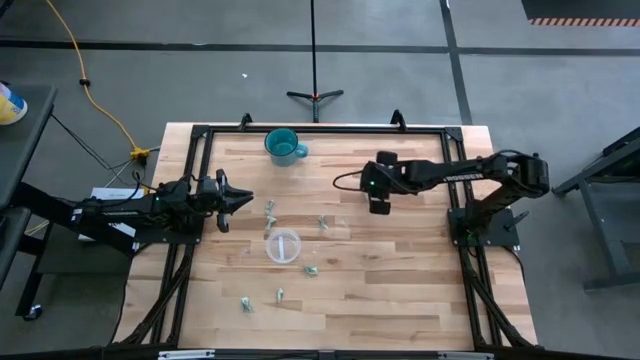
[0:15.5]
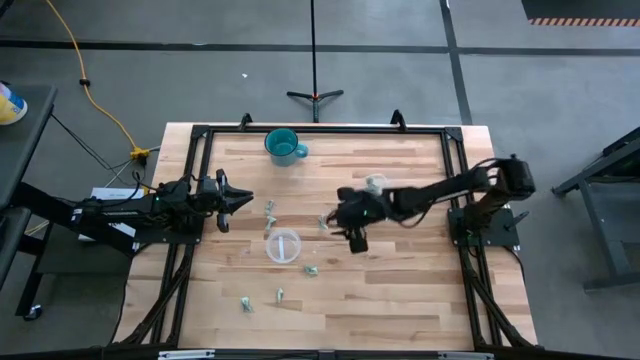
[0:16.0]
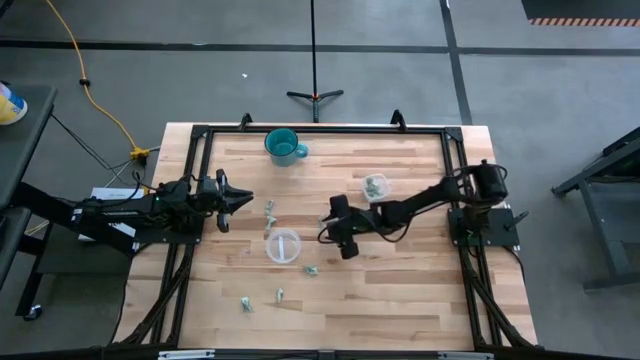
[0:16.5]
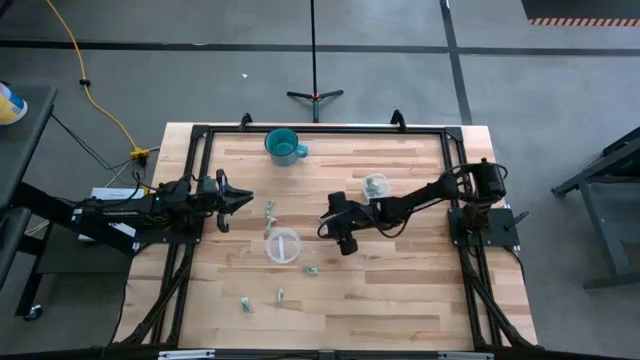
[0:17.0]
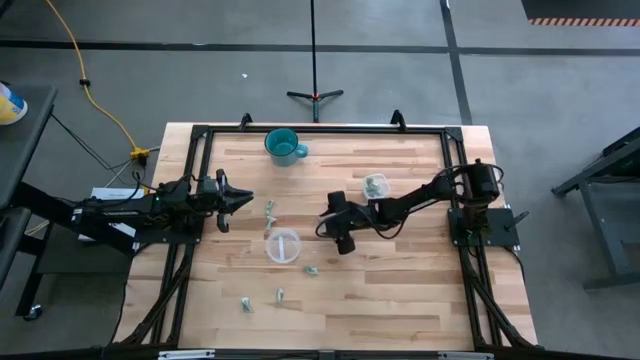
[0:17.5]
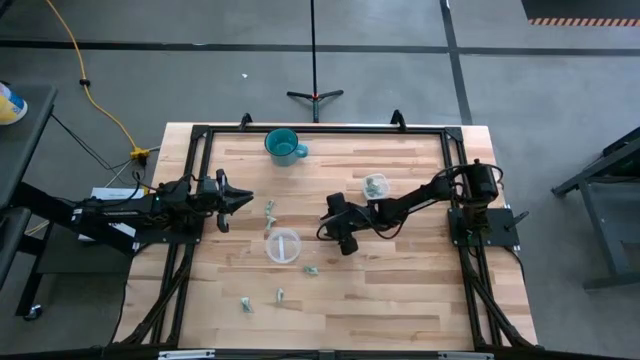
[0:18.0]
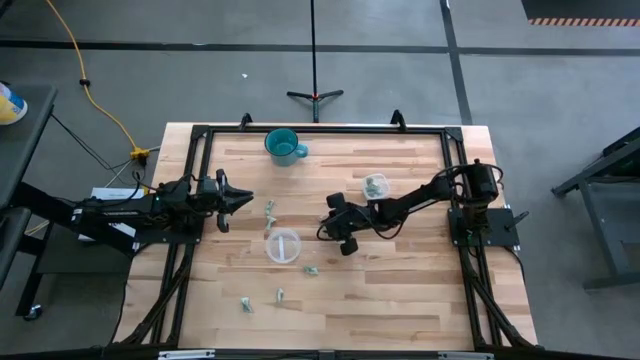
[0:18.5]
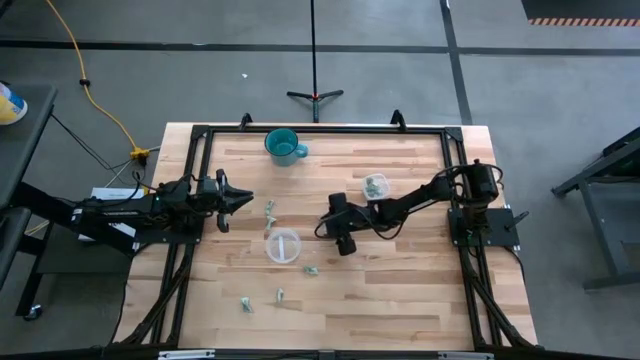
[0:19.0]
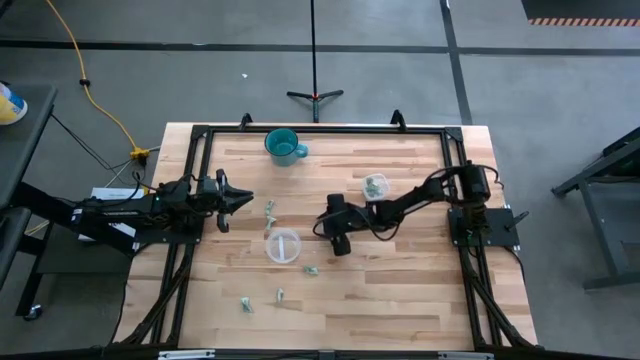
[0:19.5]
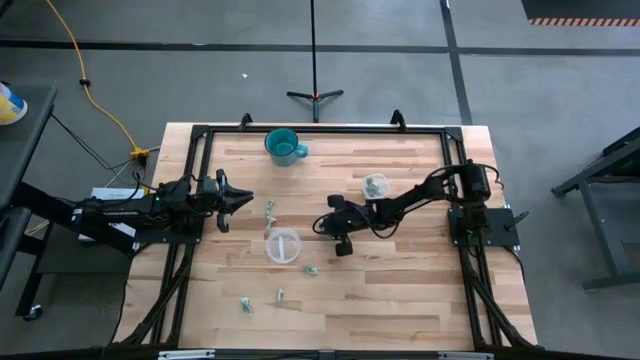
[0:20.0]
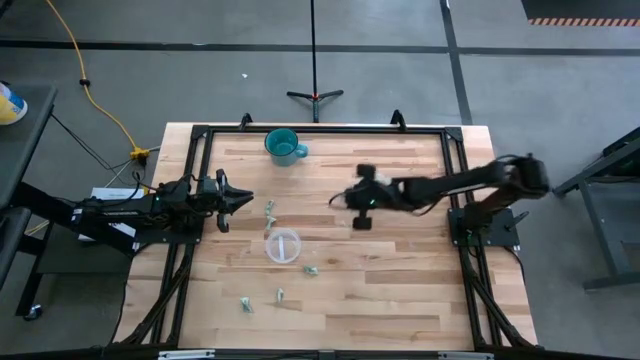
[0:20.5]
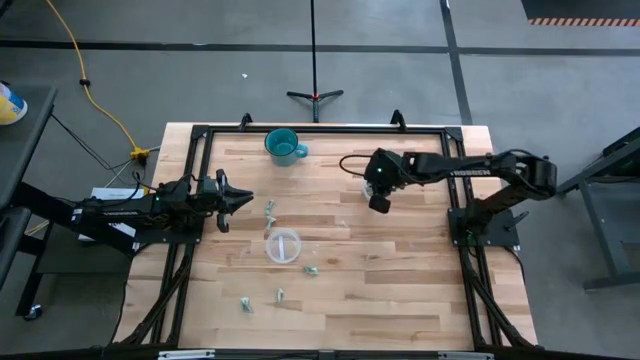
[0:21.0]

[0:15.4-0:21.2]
Task: Pick and place items into bin
Put the stevia packet into the right transparent bin

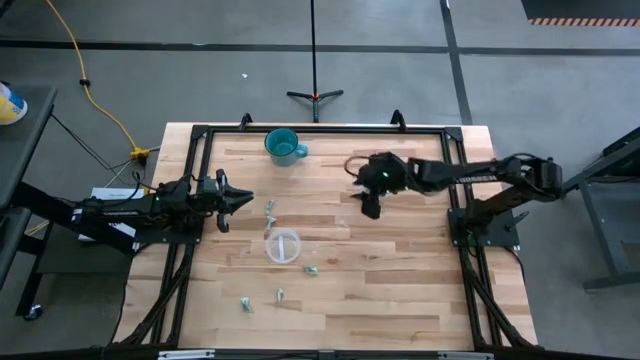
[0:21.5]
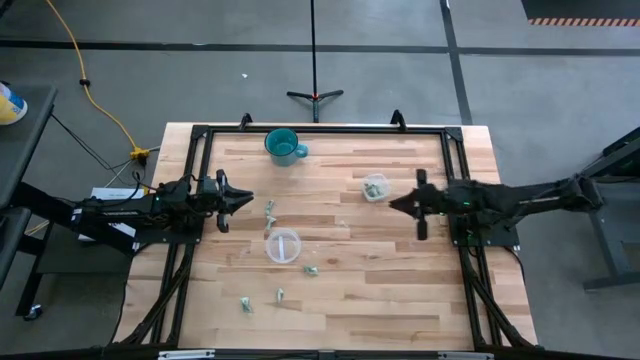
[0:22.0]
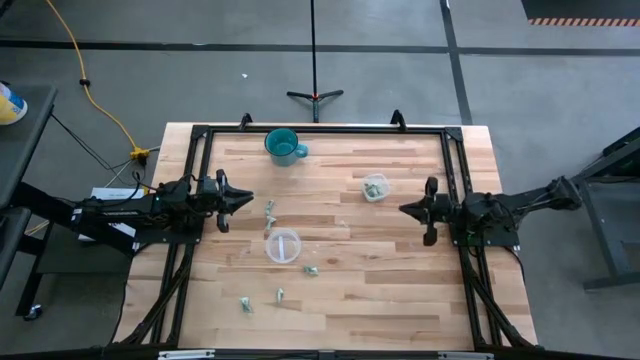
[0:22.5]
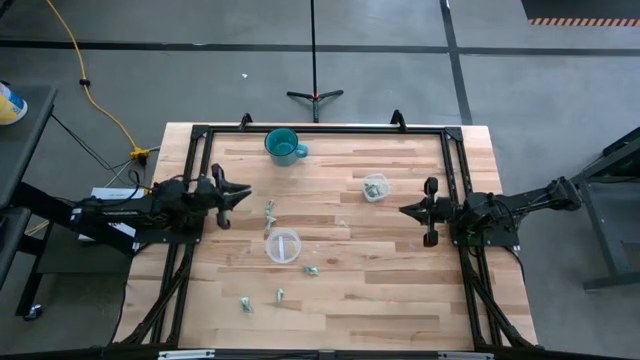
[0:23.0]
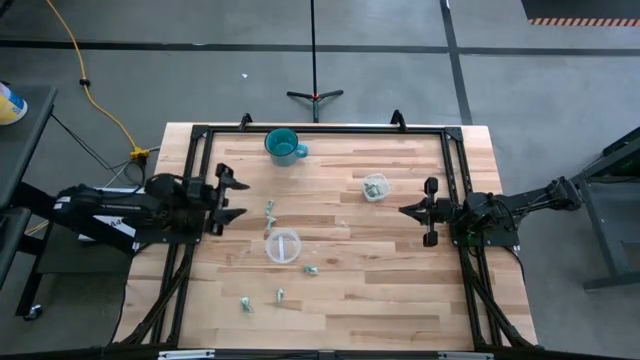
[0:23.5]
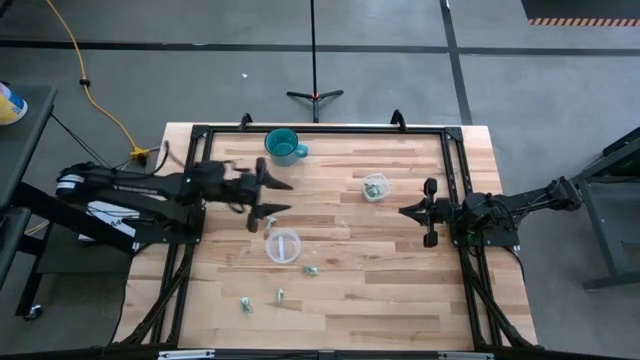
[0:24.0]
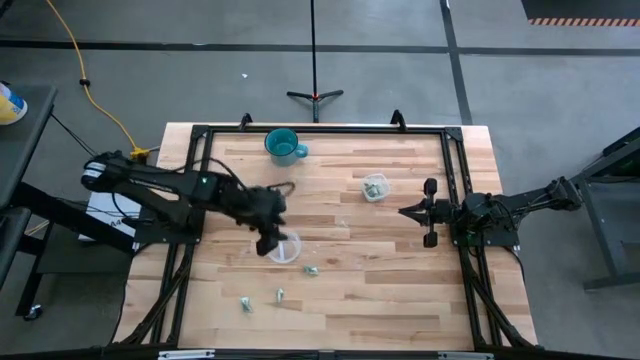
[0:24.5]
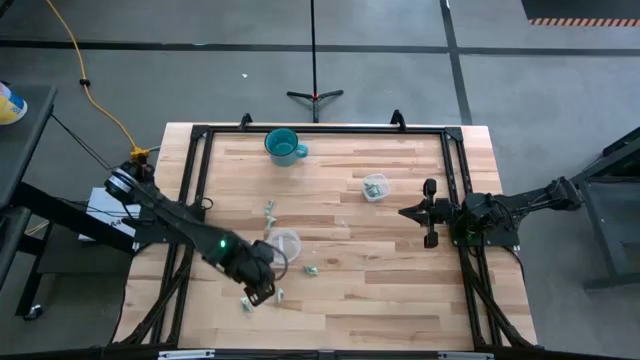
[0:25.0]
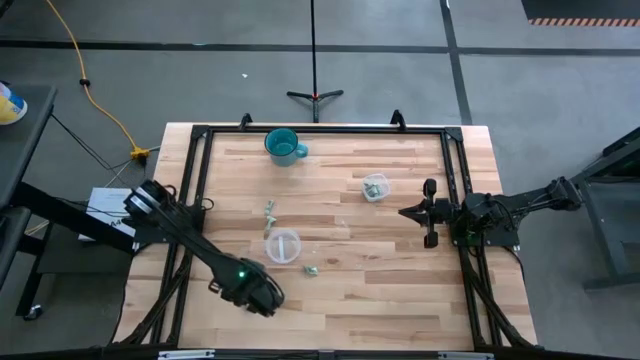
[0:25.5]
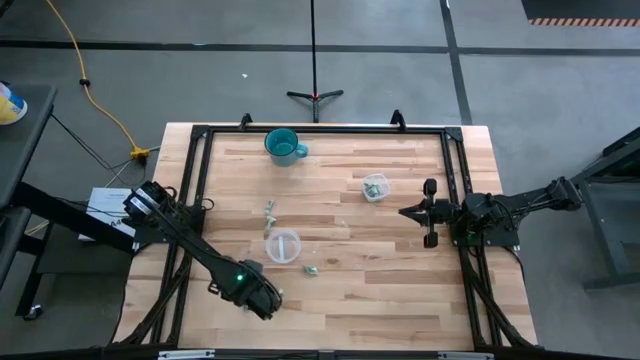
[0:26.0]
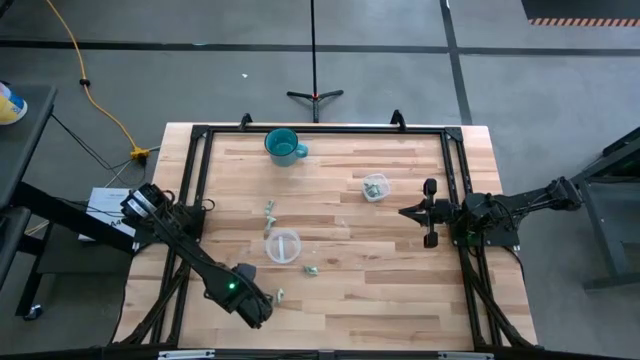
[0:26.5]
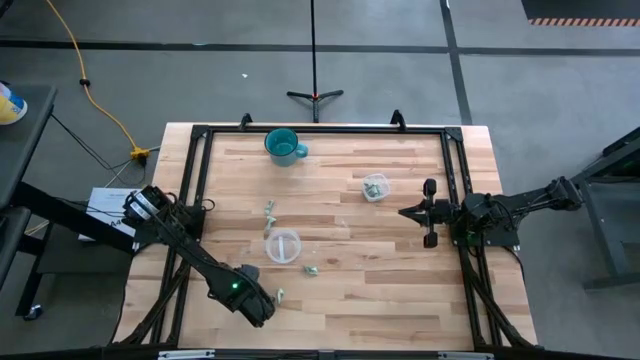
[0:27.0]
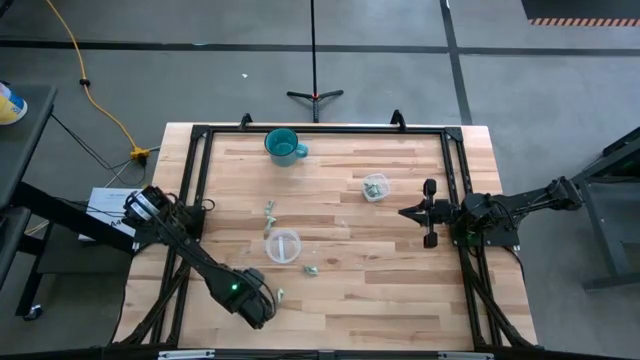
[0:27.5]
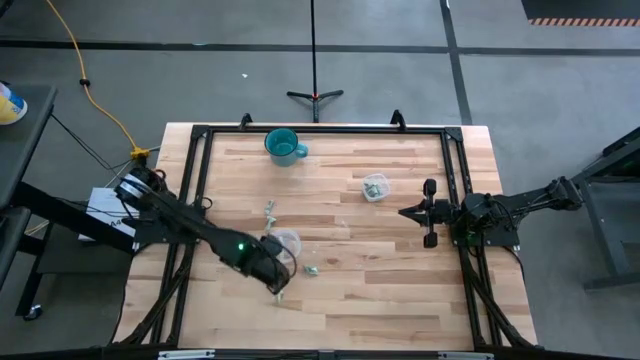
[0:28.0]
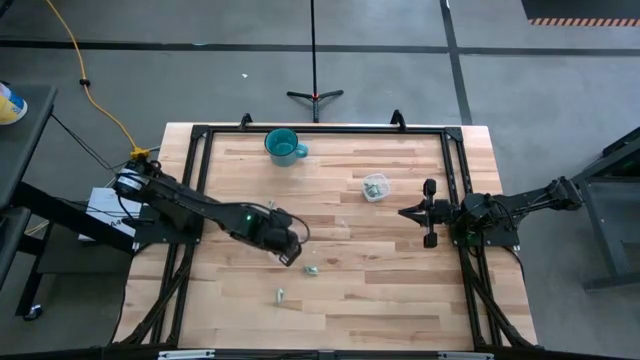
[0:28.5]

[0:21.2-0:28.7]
Put the stevia packet into the left transparent bin

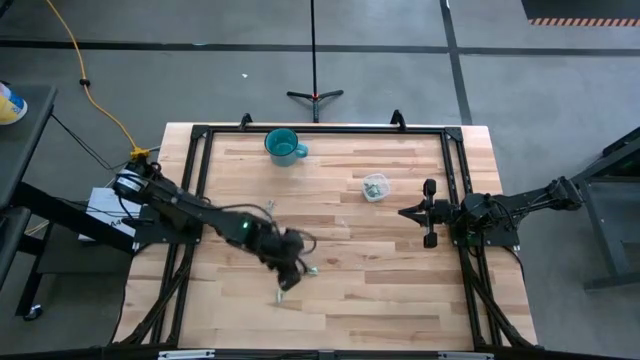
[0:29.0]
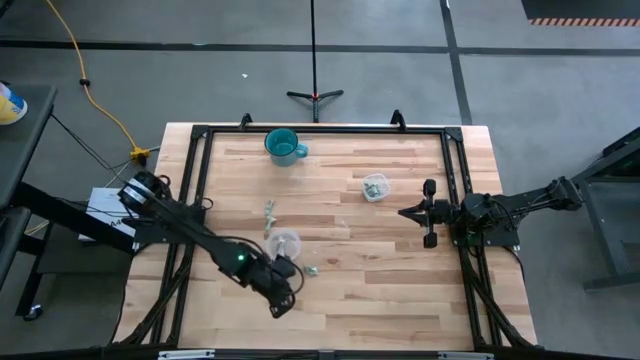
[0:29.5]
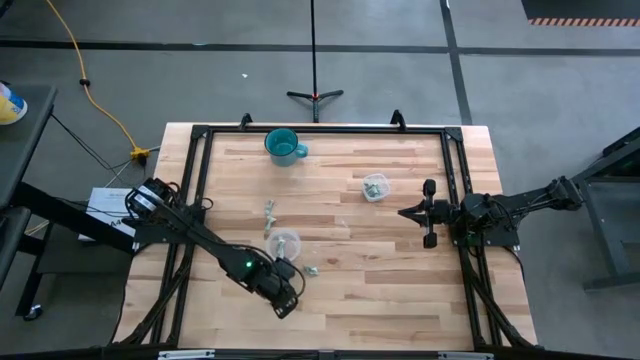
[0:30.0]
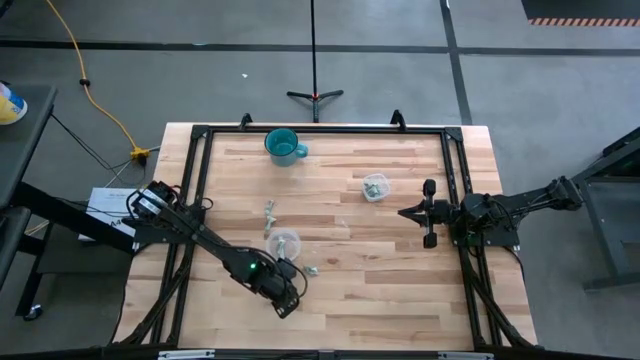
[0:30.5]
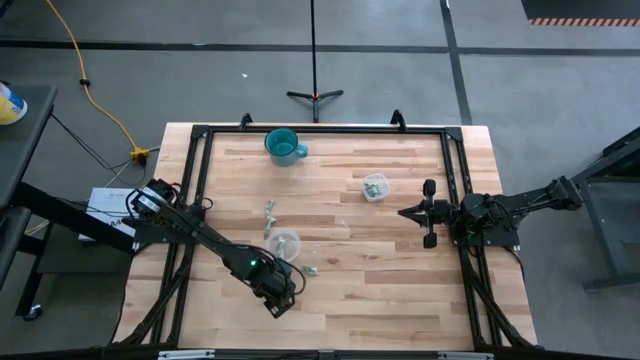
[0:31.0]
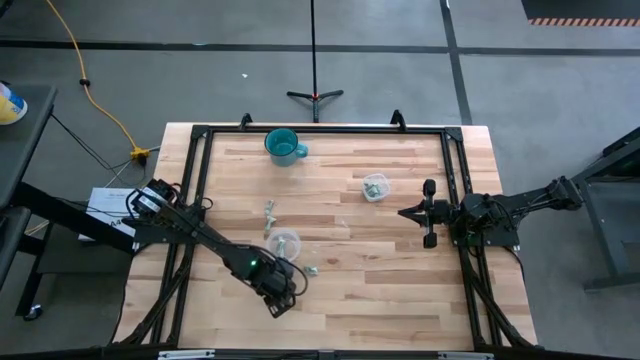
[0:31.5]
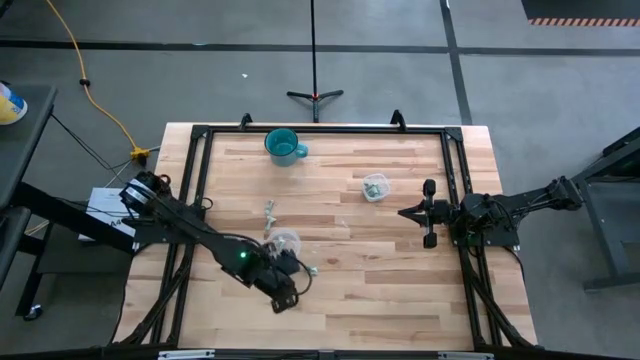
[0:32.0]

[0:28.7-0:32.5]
Put the stevia packet into the left transparent bin

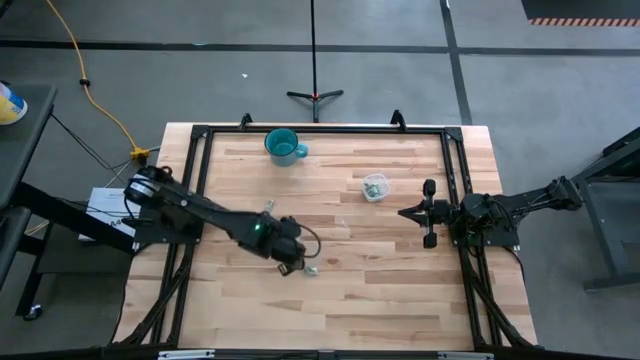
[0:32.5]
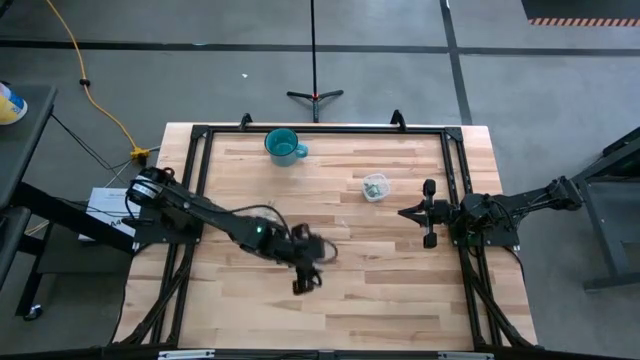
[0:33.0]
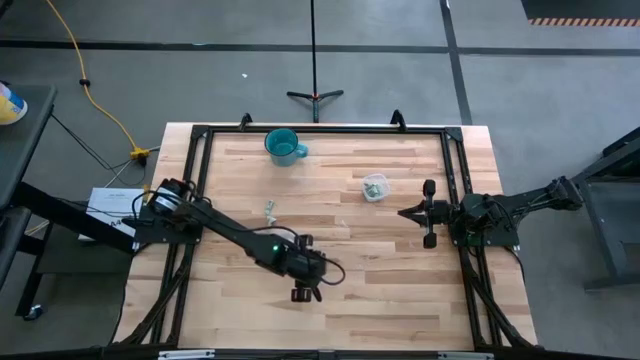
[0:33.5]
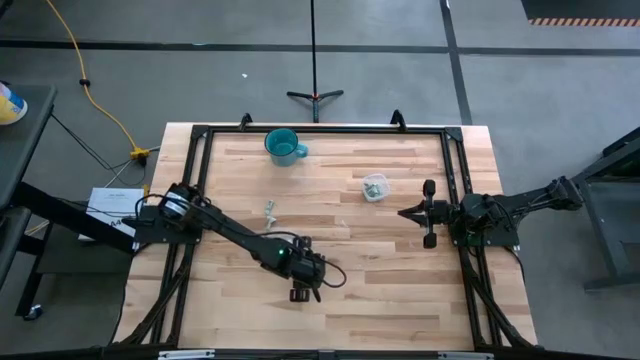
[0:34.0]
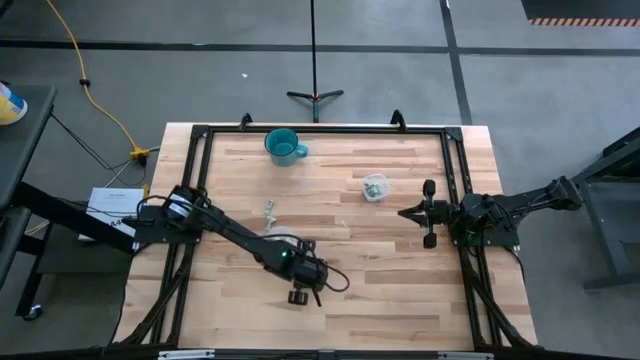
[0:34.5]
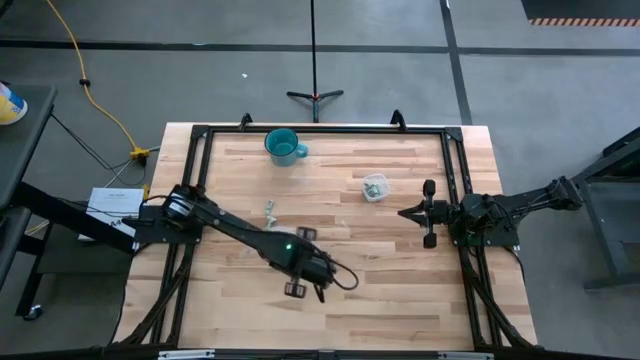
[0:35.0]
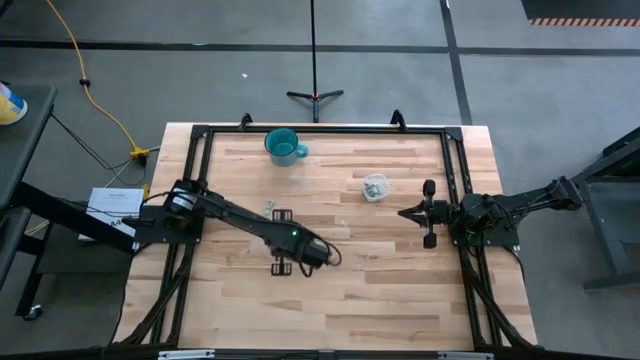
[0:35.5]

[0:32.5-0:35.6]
Put the stevia packet into the left transparent bin

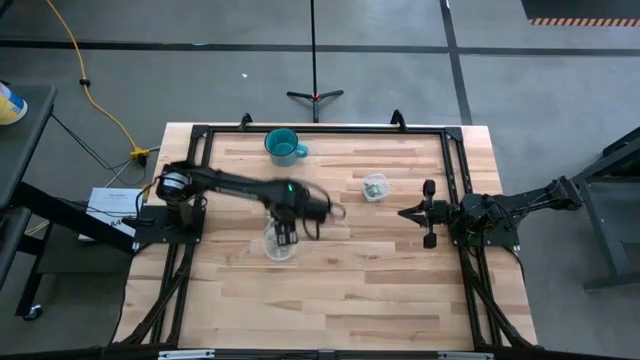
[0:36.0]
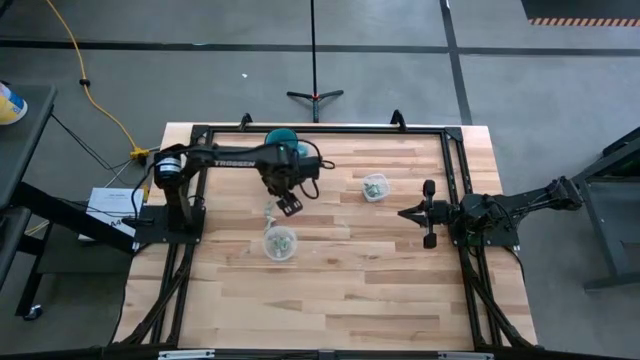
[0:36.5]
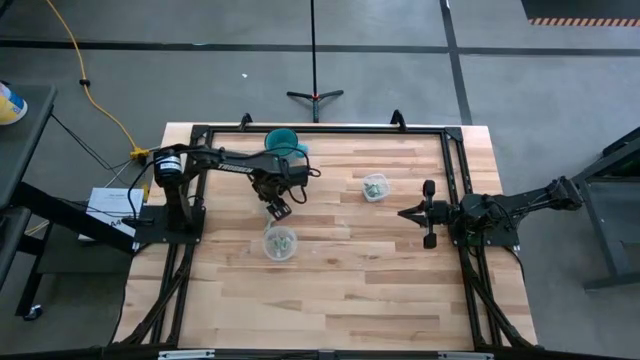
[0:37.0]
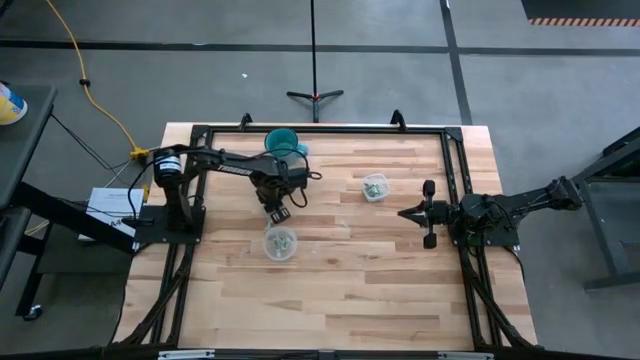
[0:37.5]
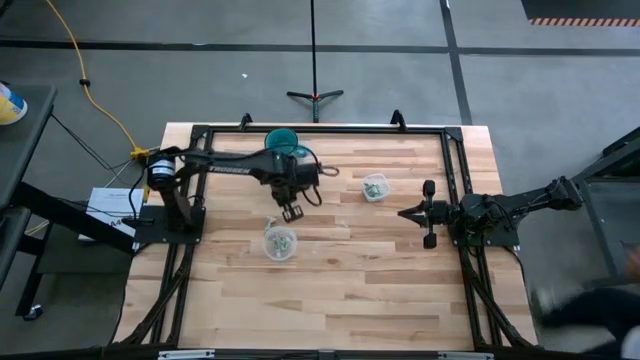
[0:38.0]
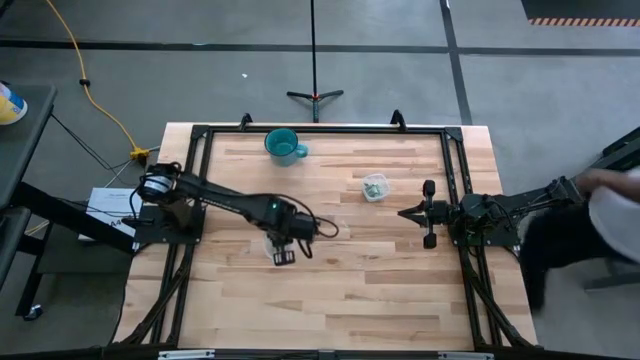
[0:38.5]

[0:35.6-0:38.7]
Put the stevia packet into the left transparent bin
